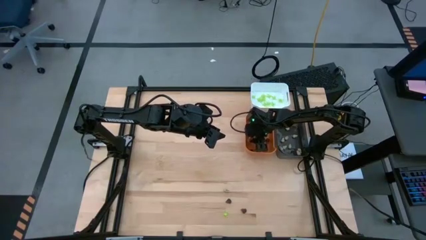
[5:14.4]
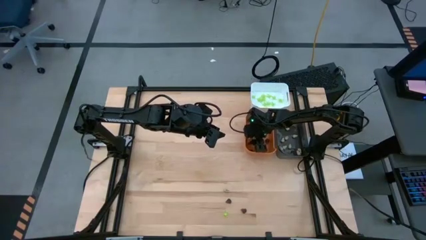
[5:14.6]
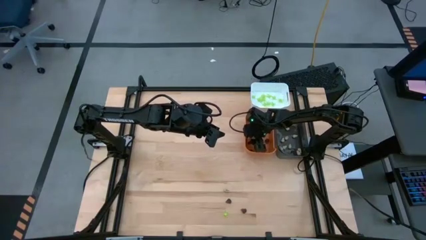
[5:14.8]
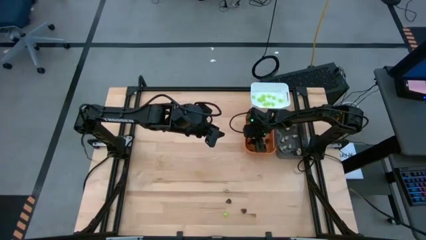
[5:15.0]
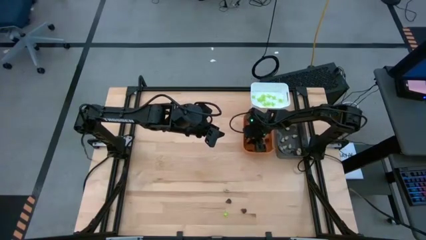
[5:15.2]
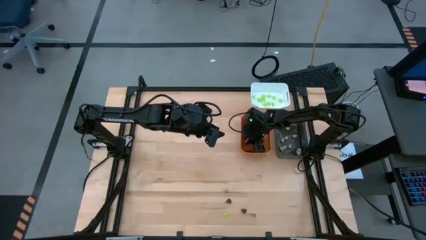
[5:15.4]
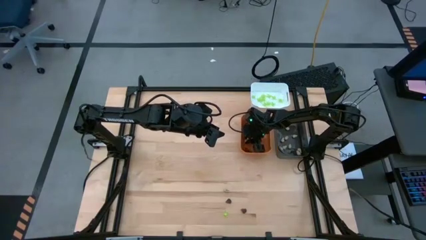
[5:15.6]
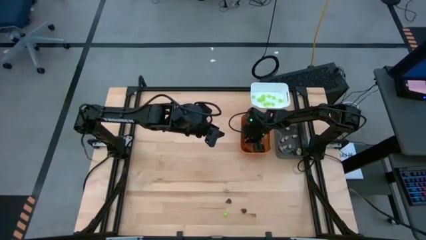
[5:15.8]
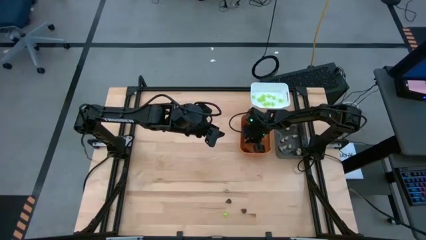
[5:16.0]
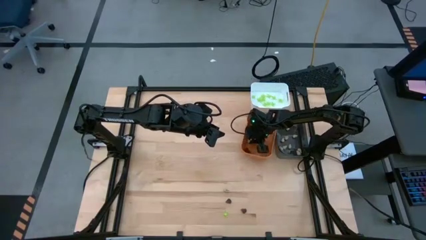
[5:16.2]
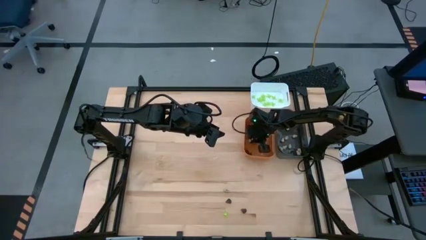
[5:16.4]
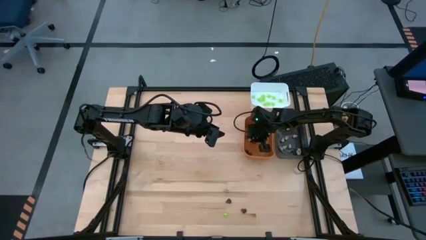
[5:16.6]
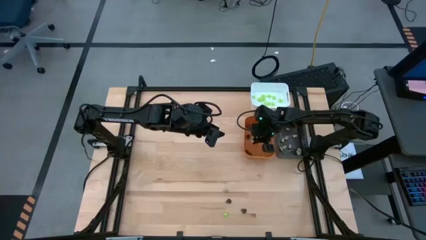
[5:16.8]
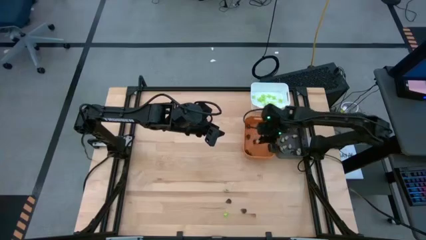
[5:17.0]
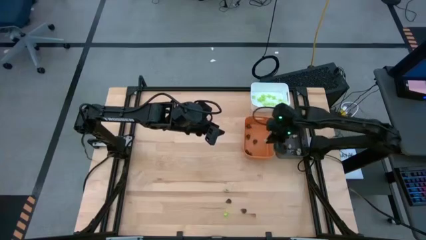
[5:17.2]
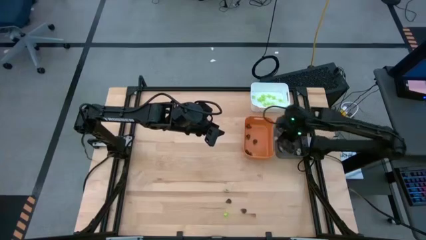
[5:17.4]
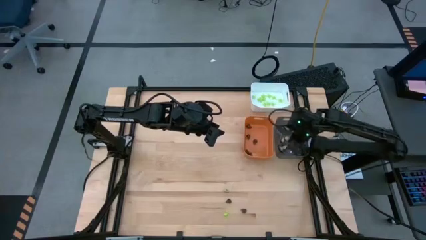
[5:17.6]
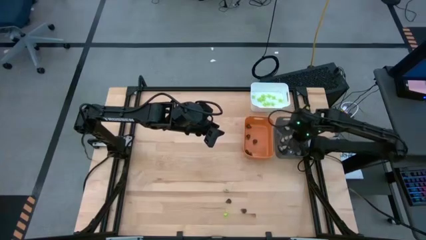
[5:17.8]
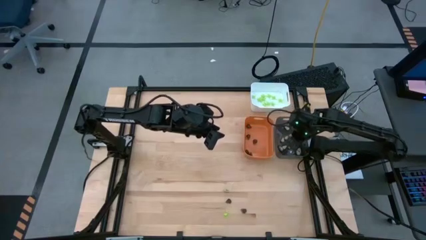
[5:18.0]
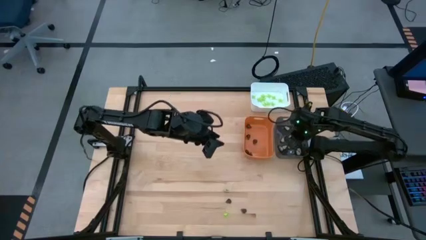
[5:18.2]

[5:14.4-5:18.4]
Task: Sort Halloween decoration
Put the white skull toy into the black bin

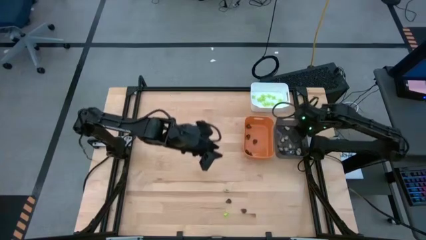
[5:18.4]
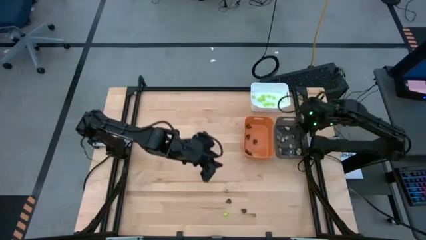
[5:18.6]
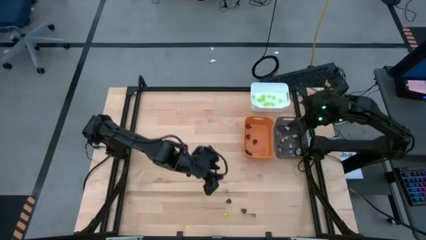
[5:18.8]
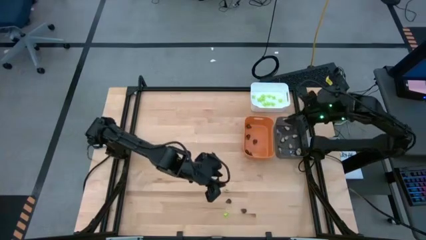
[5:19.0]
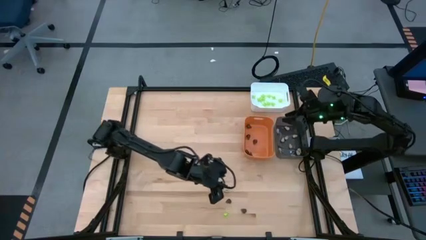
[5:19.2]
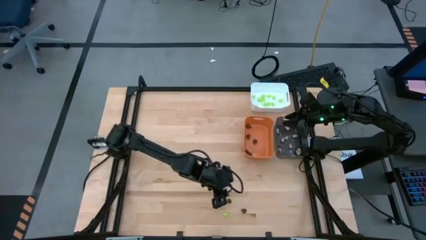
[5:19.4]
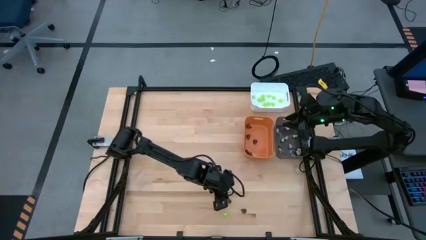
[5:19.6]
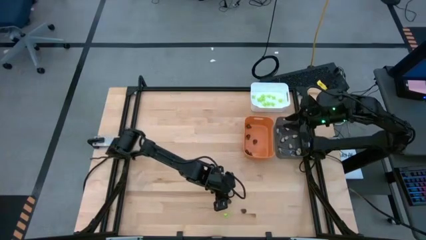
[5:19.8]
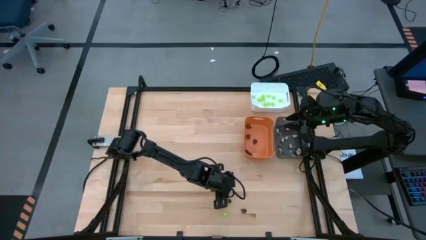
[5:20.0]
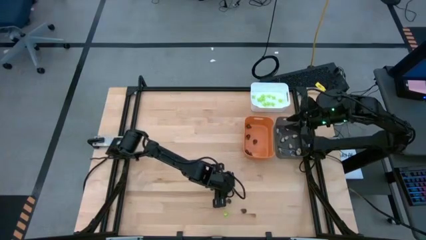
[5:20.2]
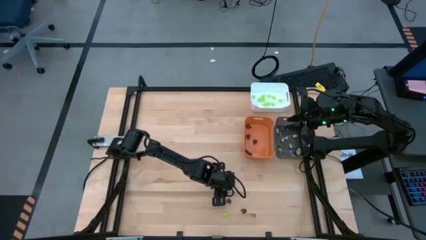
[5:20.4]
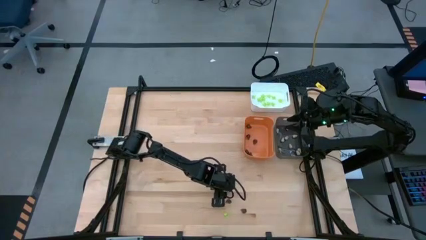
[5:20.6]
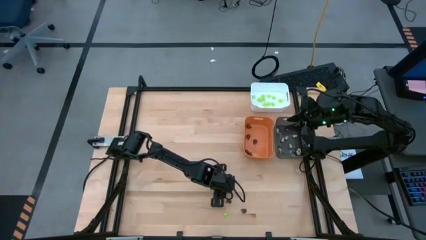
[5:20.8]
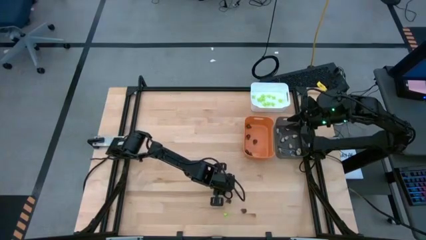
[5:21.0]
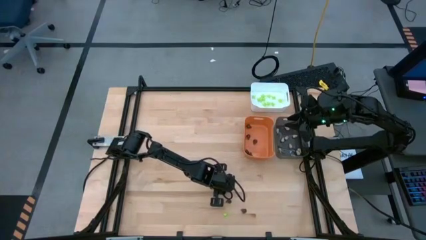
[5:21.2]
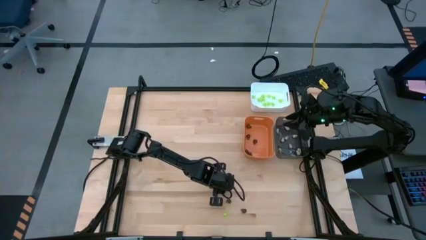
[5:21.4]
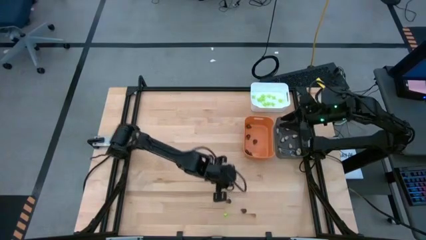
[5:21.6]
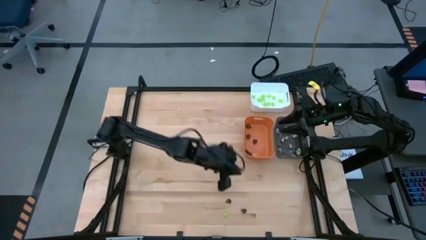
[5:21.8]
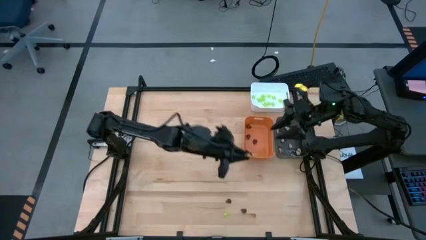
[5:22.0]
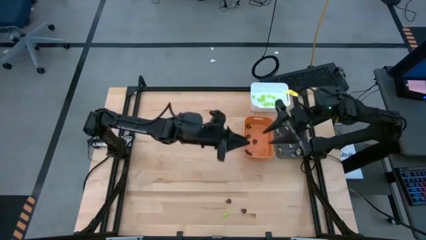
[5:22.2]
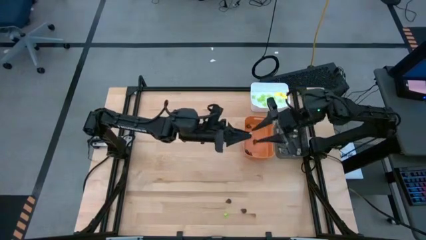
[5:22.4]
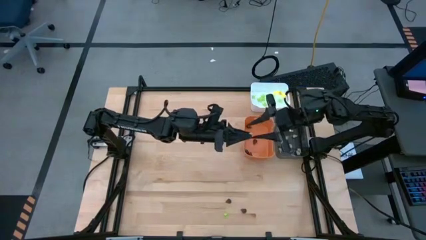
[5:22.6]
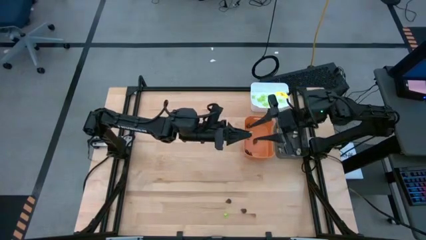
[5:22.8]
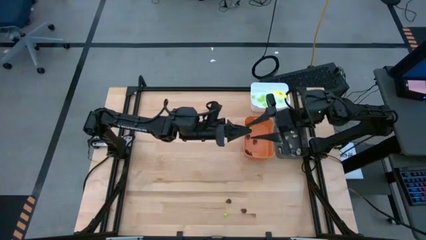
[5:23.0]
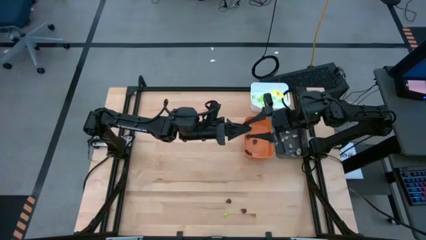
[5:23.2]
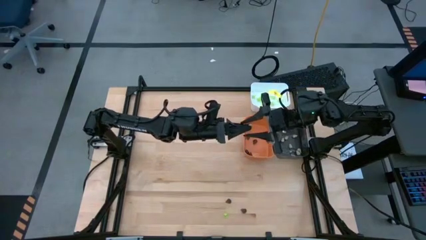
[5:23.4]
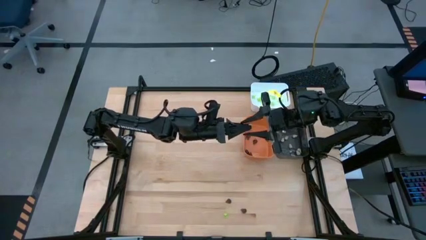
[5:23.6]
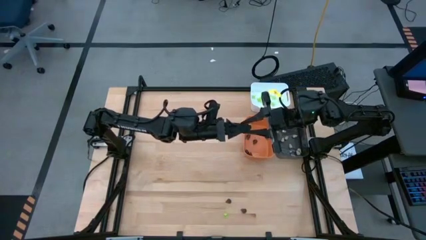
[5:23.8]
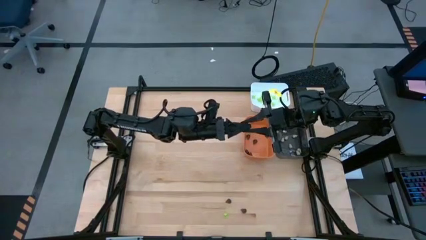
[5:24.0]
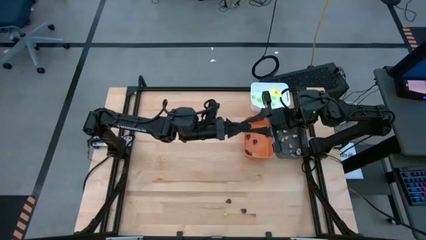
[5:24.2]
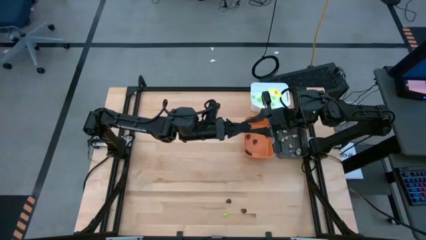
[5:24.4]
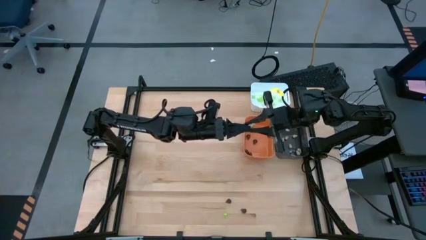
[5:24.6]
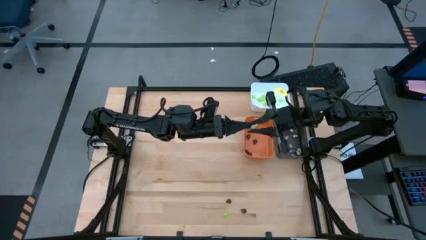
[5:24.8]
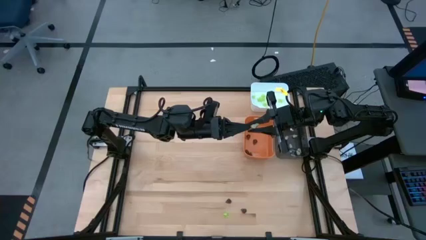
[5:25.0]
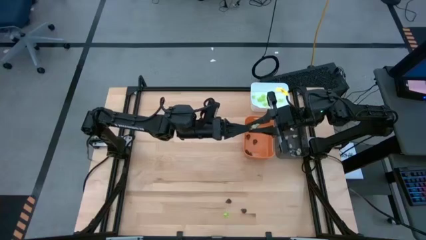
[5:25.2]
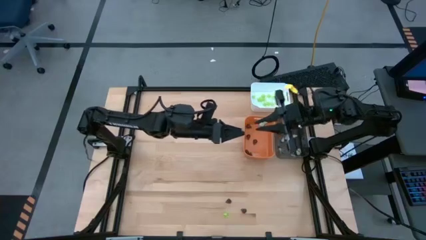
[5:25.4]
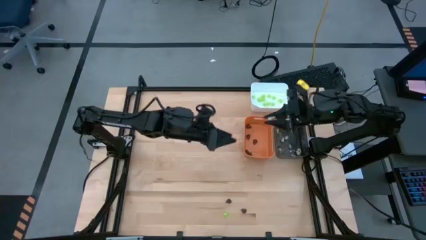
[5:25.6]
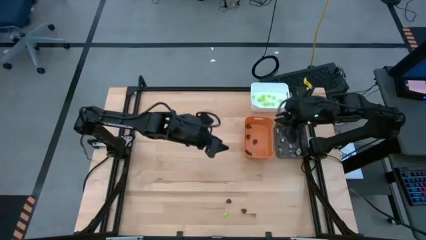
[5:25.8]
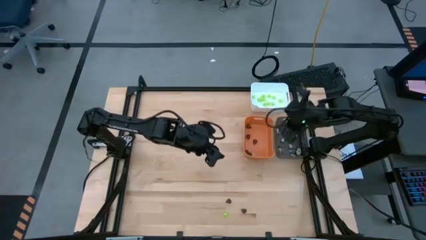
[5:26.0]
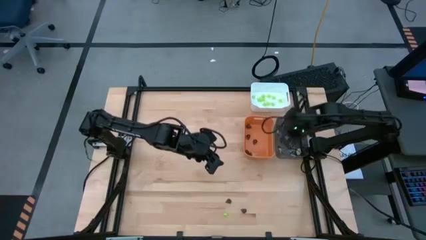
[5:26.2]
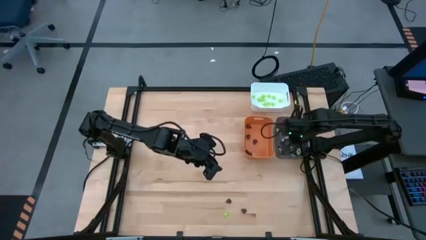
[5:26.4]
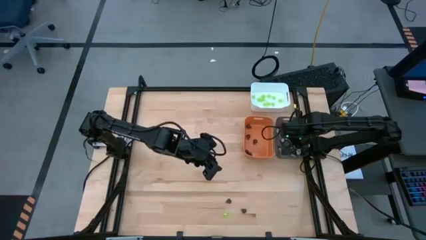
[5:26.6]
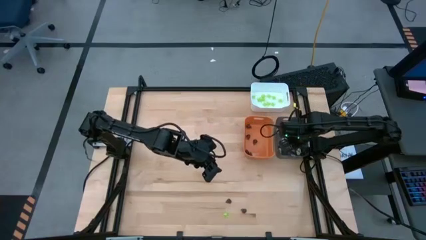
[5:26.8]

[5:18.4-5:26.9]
Put the white skull toy into the black bin

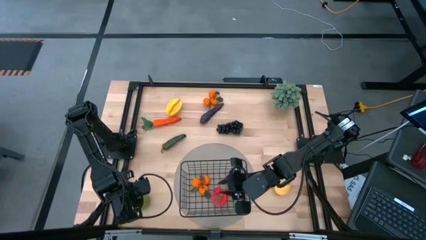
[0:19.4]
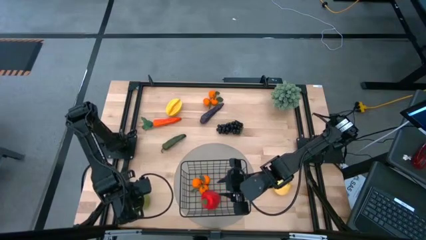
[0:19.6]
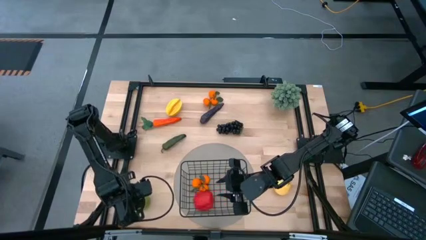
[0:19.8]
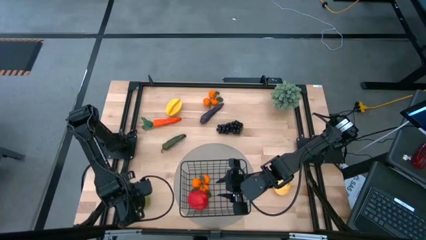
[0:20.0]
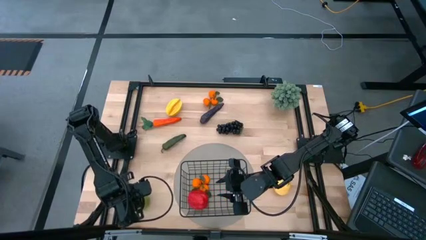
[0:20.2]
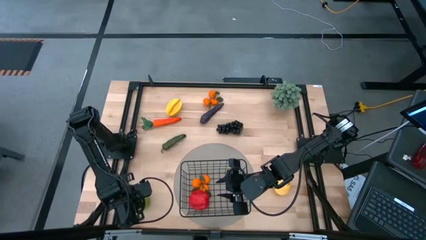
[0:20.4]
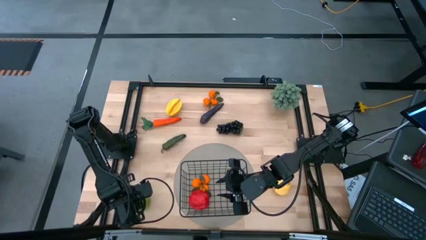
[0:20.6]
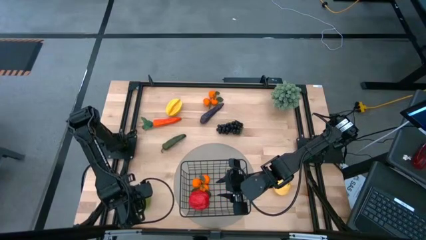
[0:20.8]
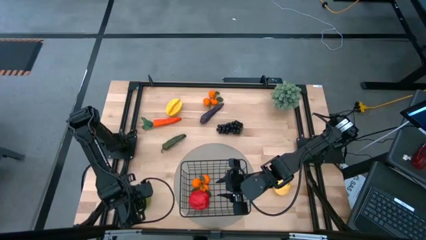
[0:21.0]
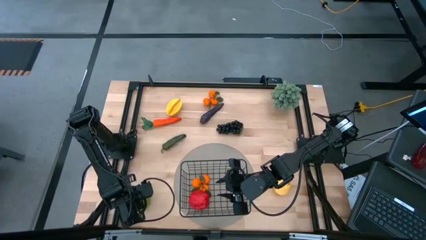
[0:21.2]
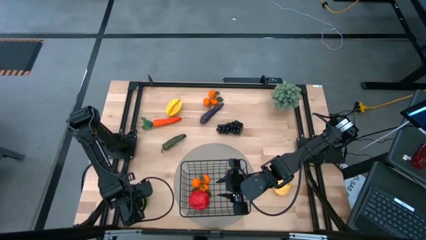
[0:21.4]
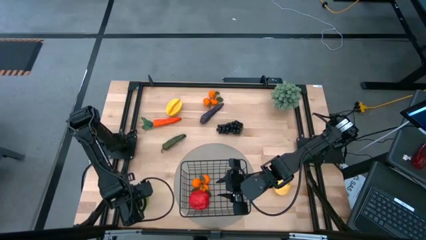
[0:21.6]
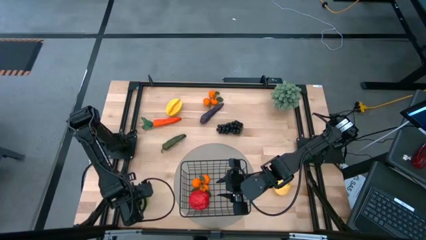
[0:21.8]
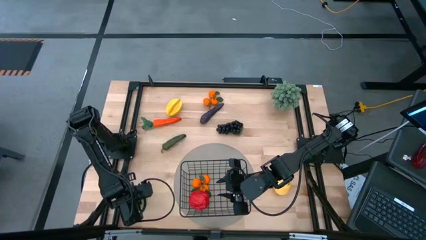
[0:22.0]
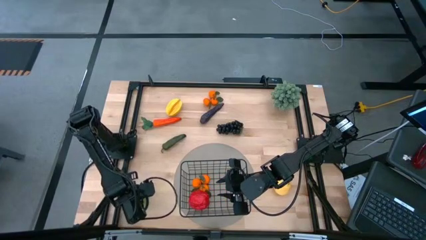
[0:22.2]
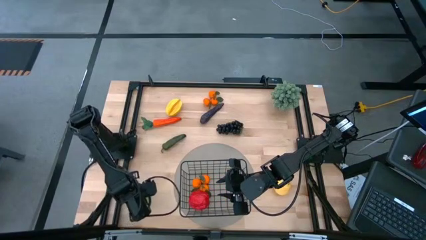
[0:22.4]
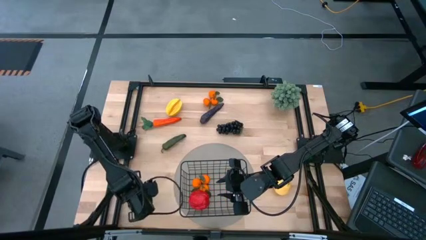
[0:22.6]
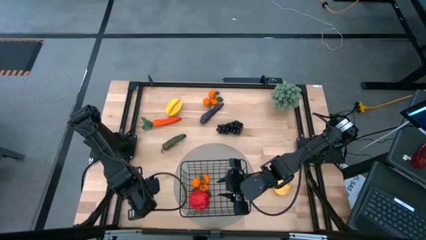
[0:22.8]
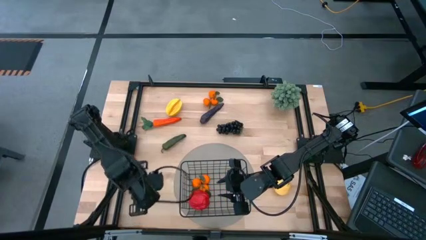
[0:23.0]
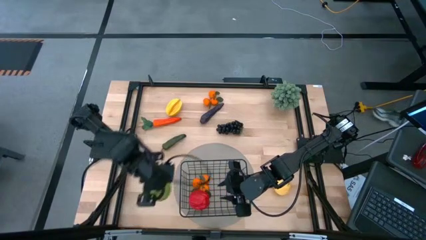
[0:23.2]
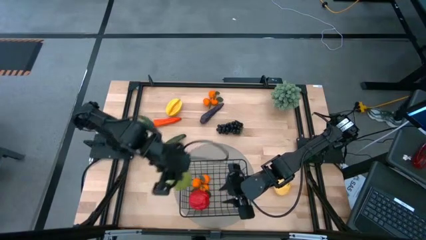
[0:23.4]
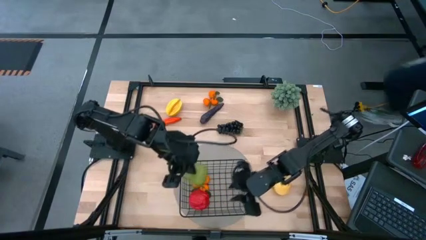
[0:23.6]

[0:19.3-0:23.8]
Task: Build produce basket
Put the green pear into the black wire basket
